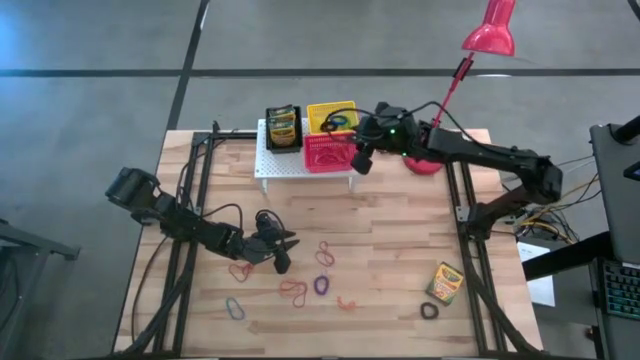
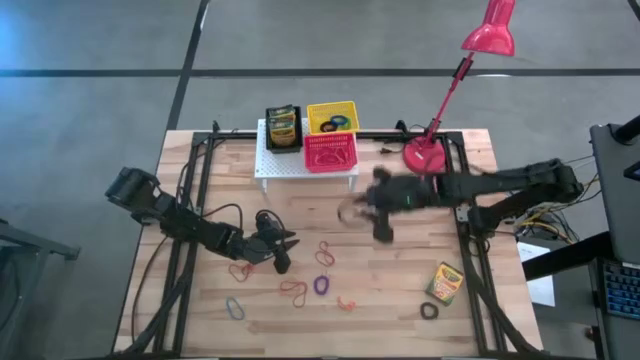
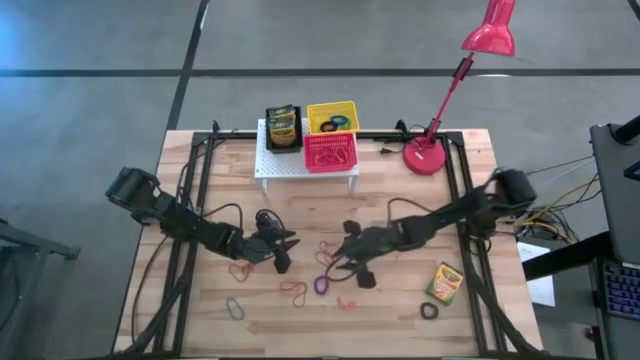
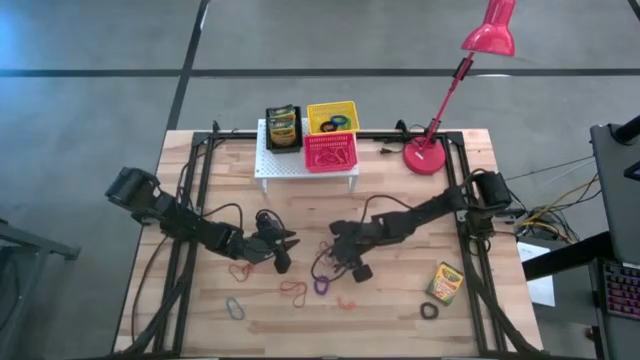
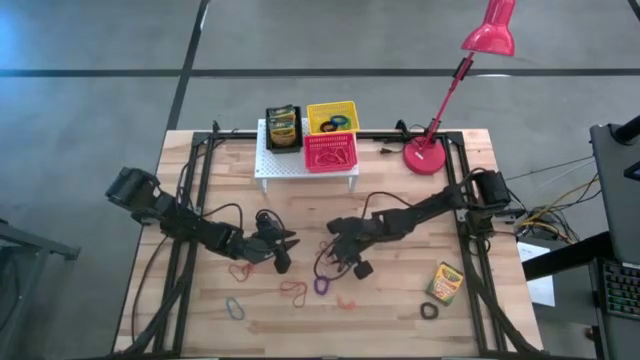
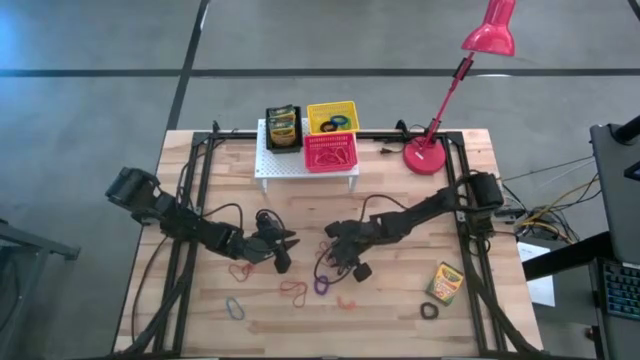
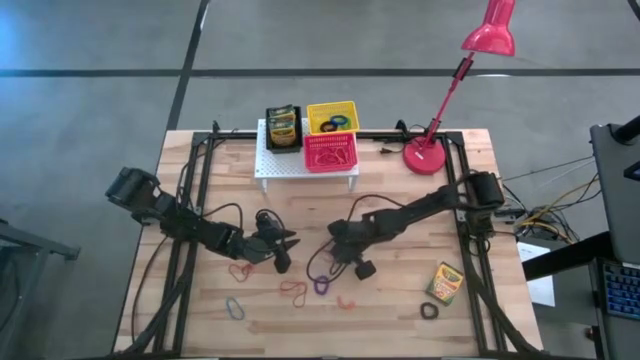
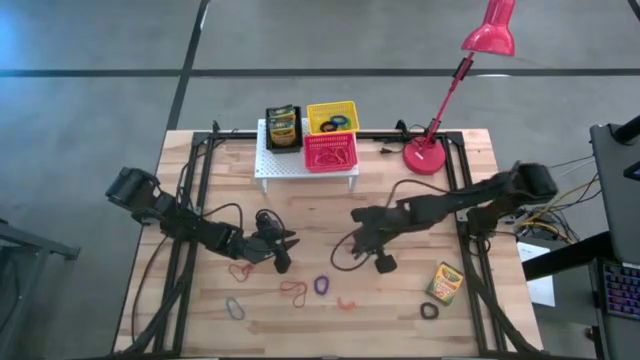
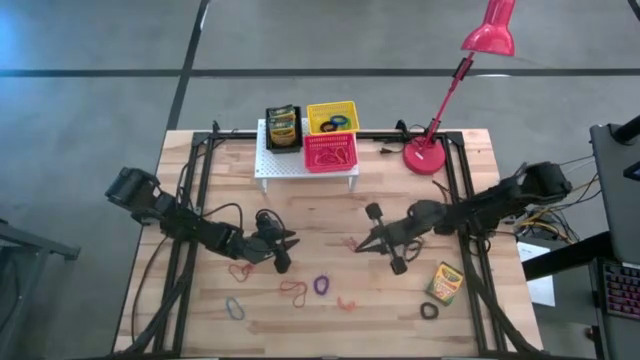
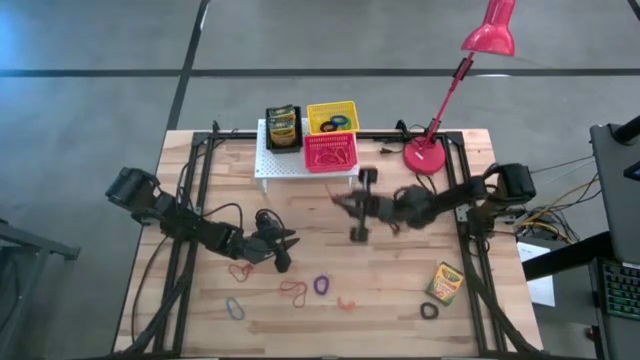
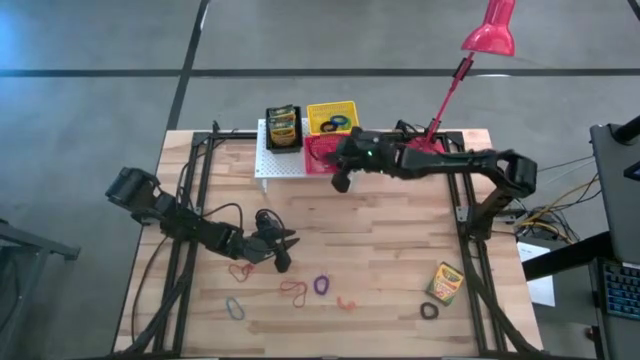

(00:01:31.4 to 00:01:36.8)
Task: Pick & Place Office Desk Supplies
Put the red rubber band into the red bin on the shelf

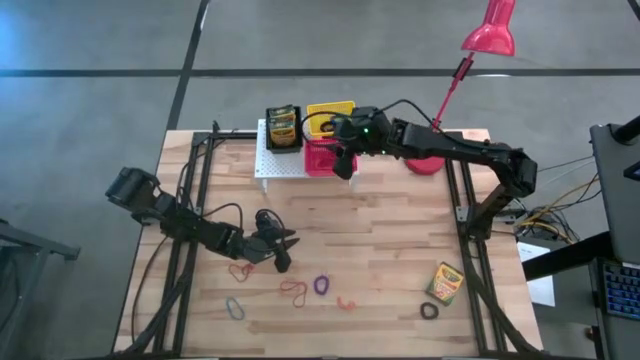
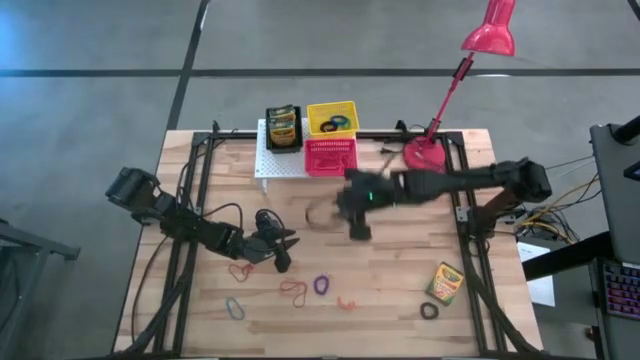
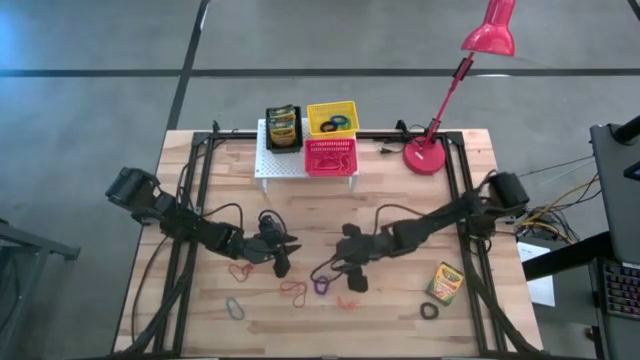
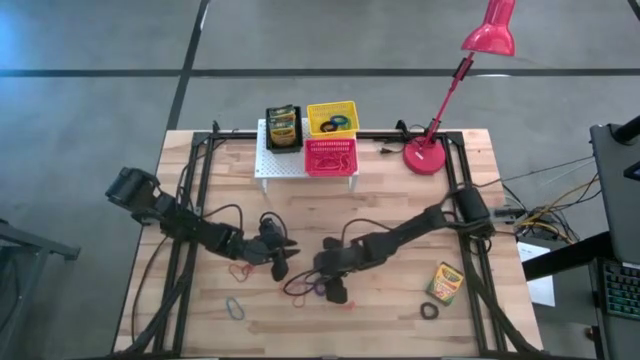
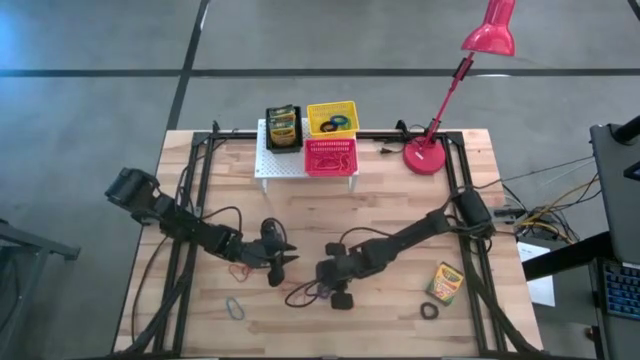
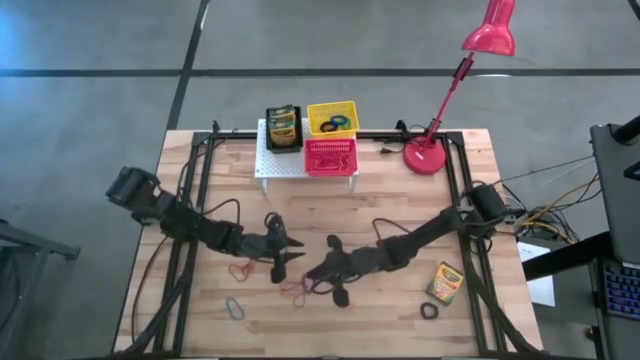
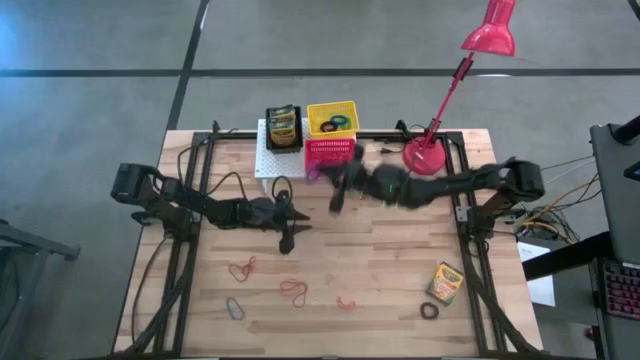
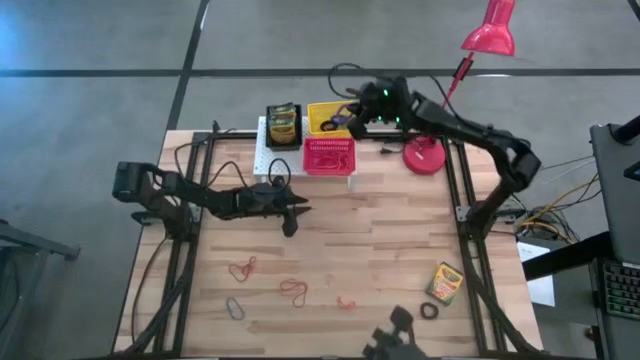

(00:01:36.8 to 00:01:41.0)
Put the violet spring keychain into the yellow bin on the shelf

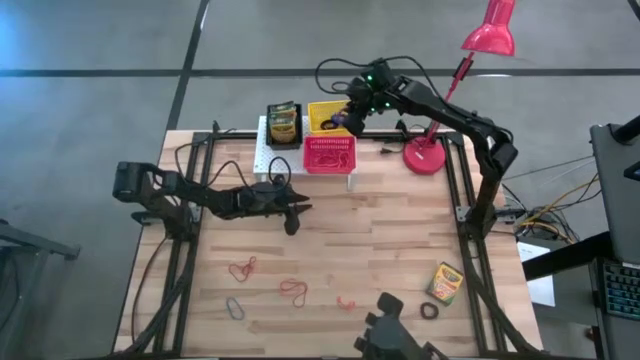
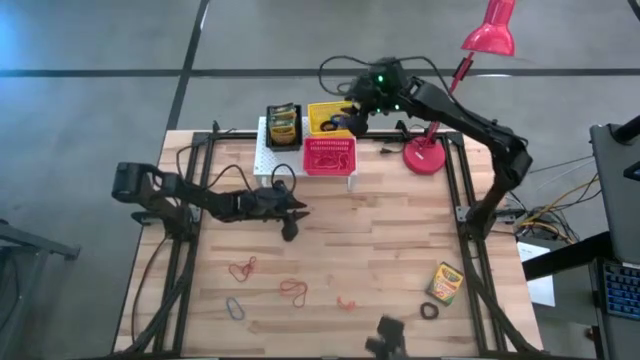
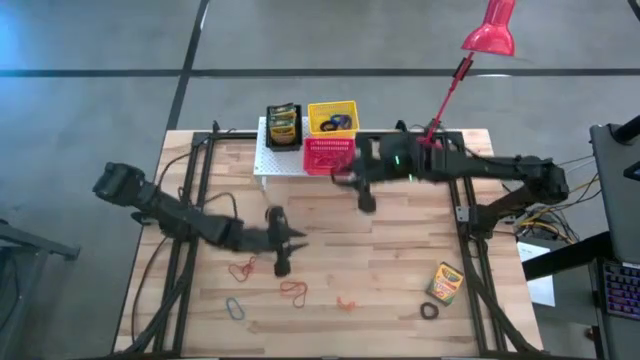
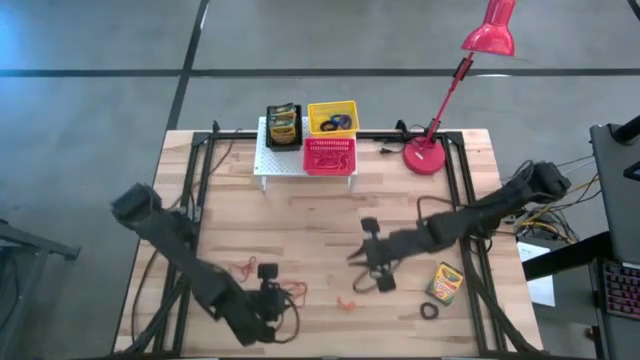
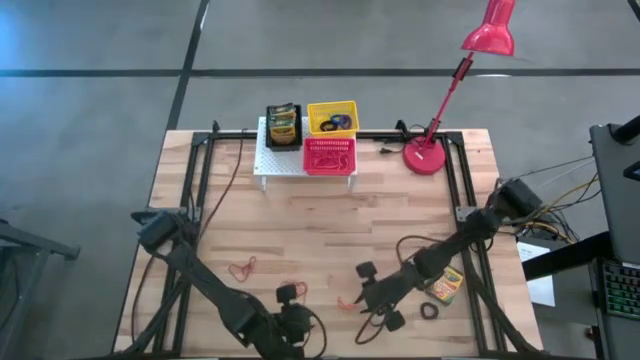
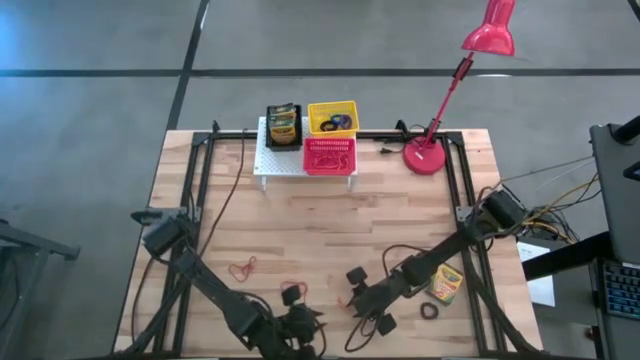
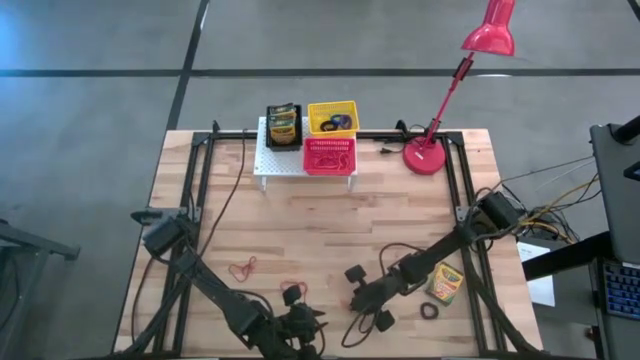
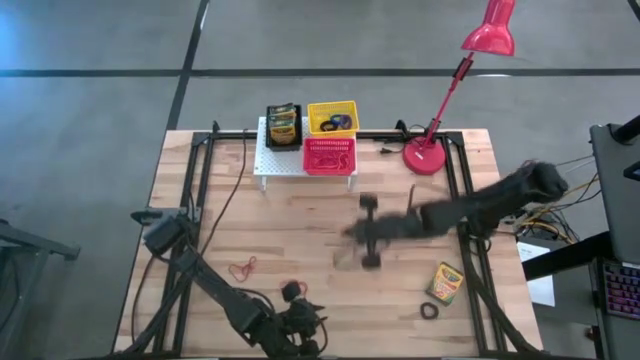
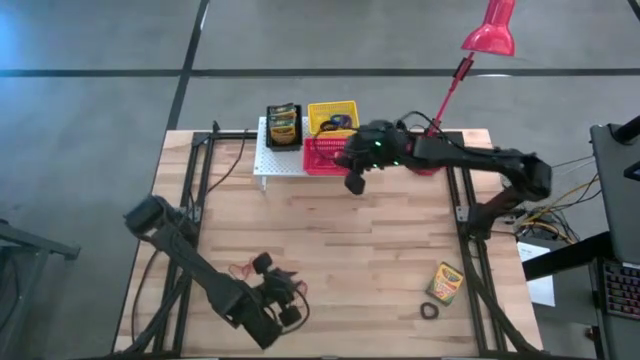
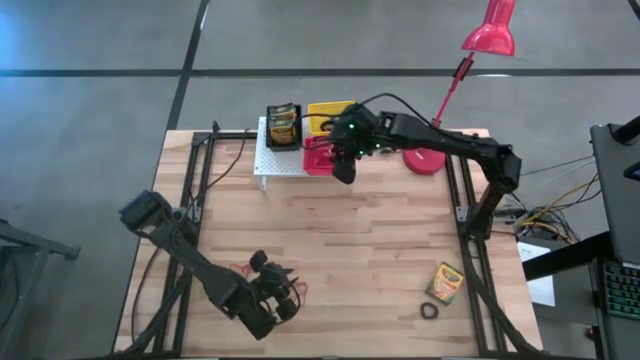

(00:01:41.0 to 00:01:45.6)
Put the orange rubber band into the red bin on the shelf

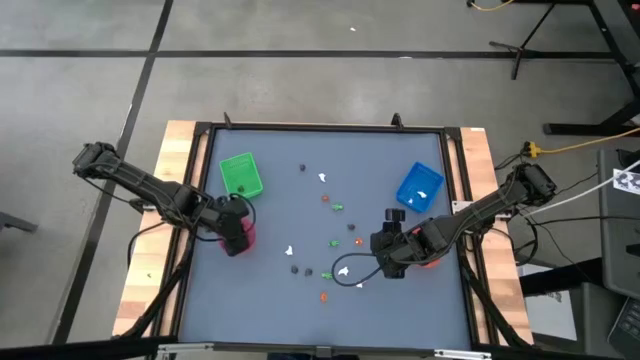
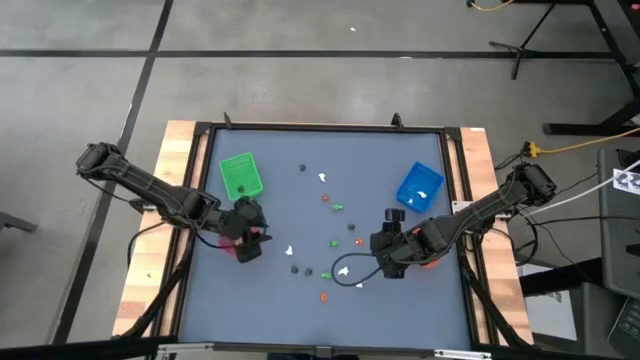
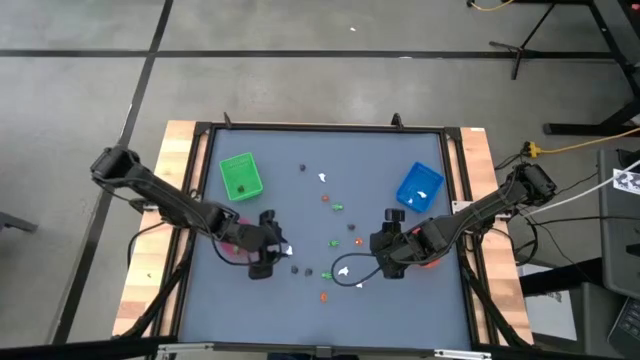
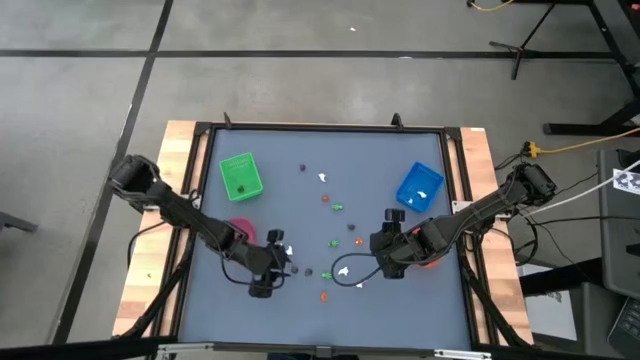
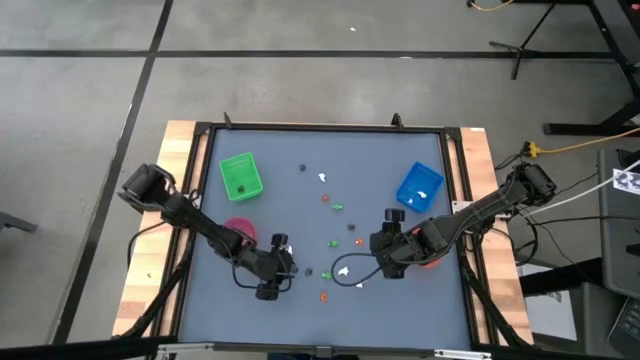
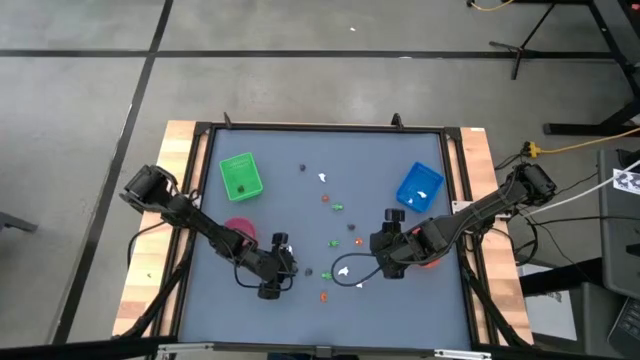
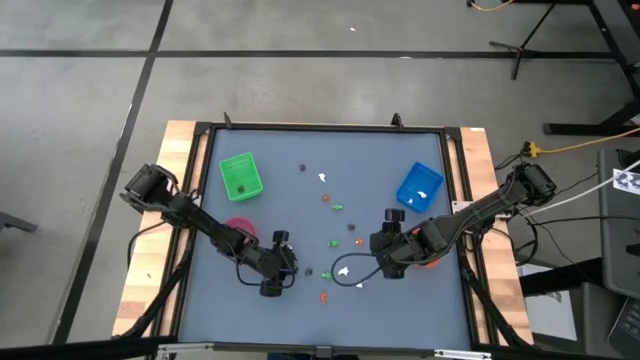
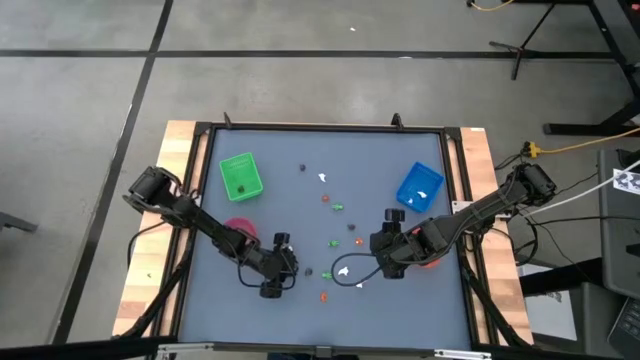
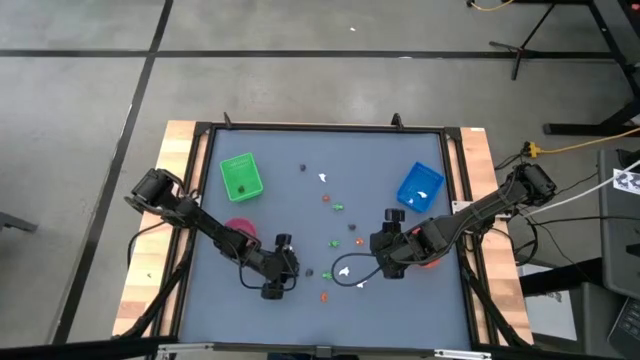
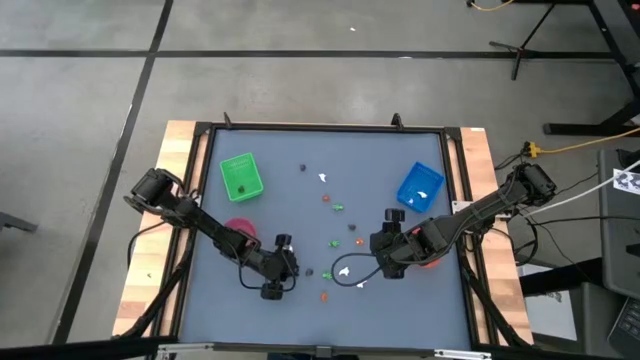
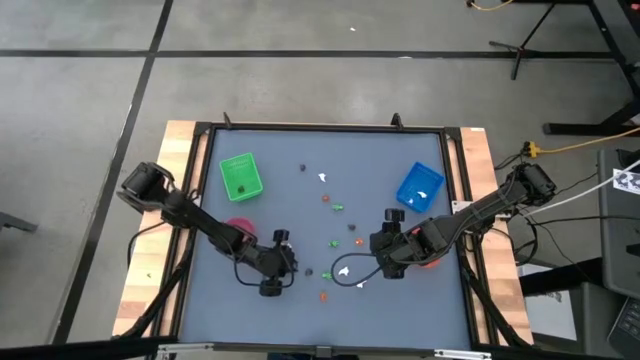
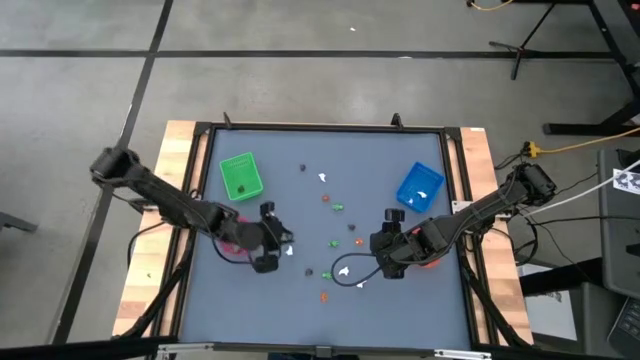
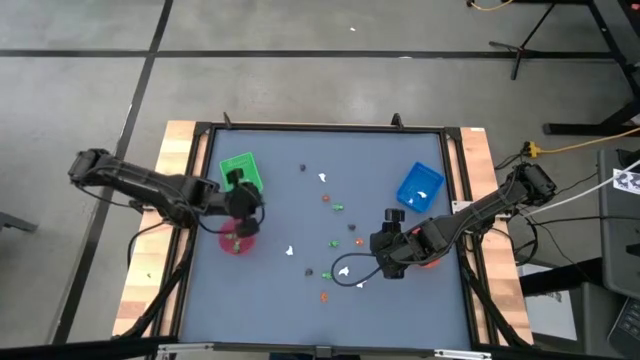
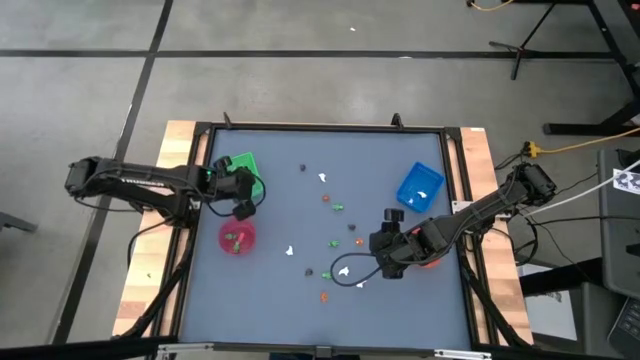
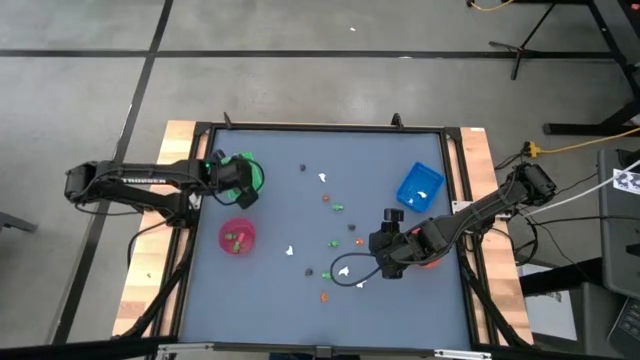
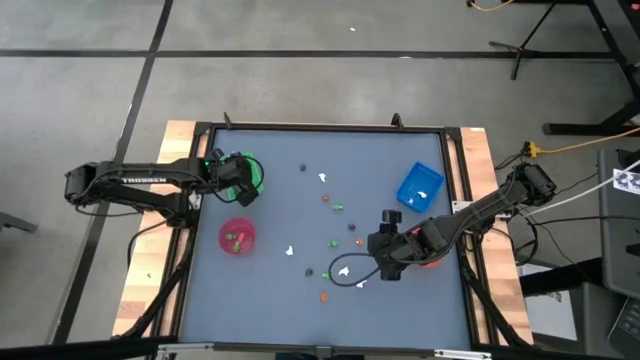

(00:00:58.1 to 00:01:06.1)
Task: Sort Halloween decoration
Put the small black skull toy into the green basket
